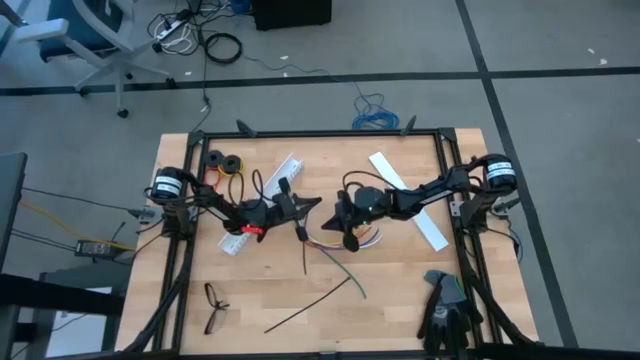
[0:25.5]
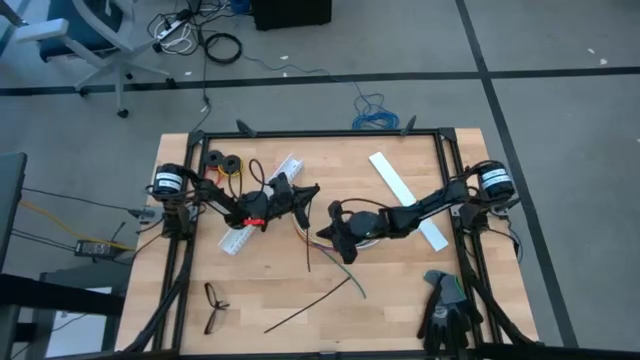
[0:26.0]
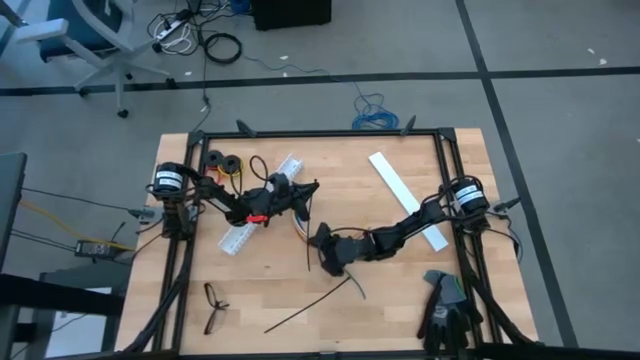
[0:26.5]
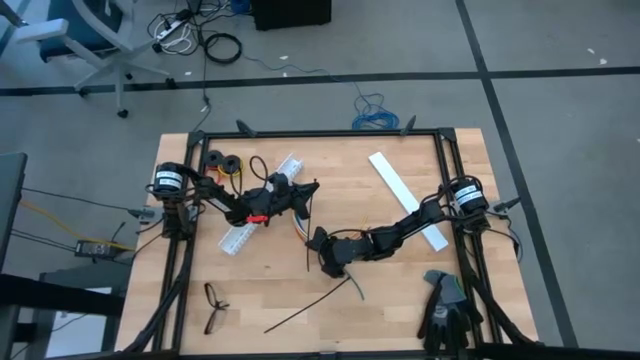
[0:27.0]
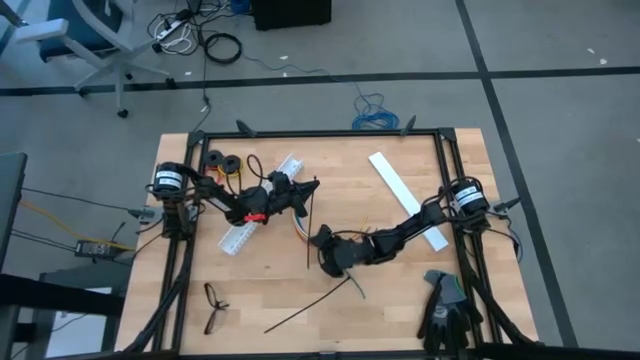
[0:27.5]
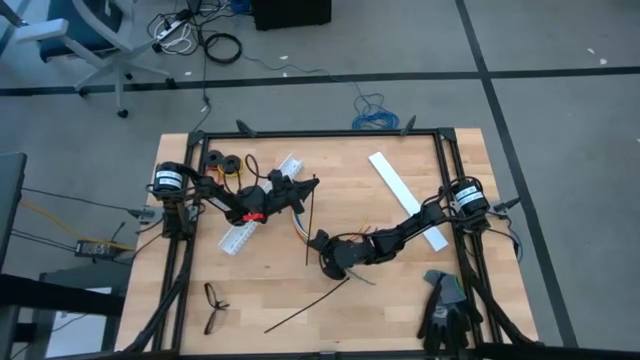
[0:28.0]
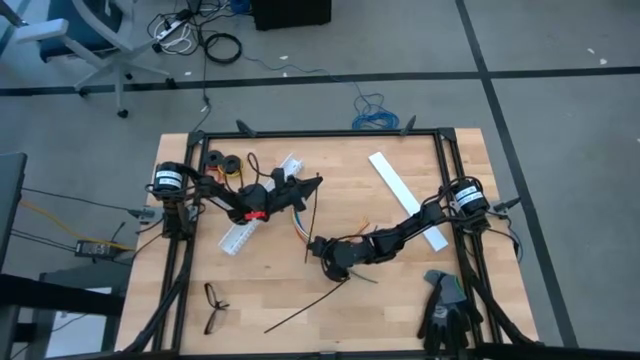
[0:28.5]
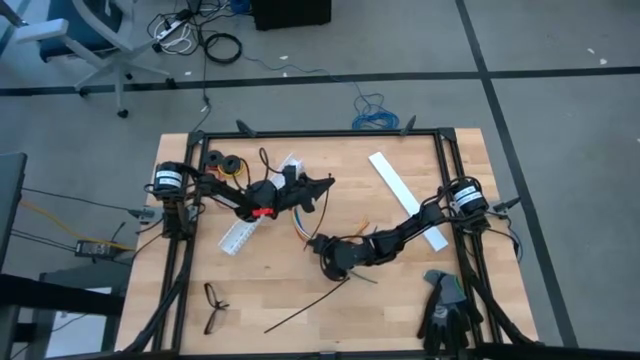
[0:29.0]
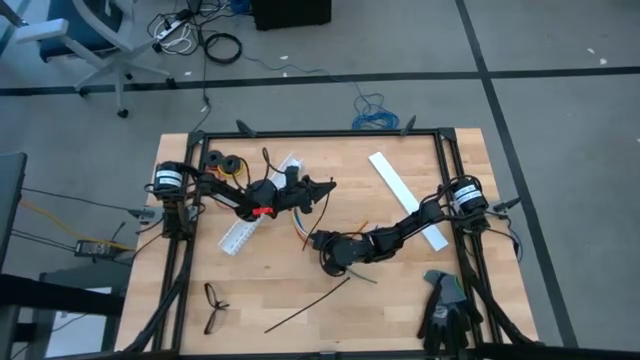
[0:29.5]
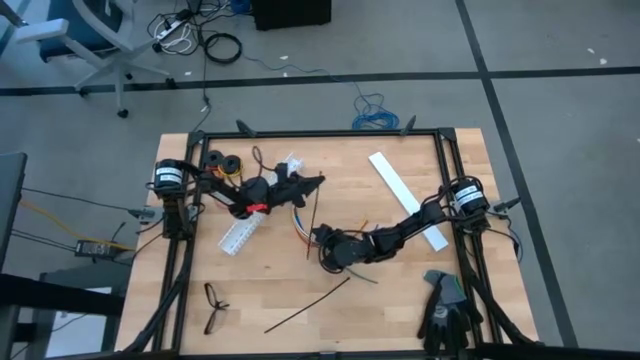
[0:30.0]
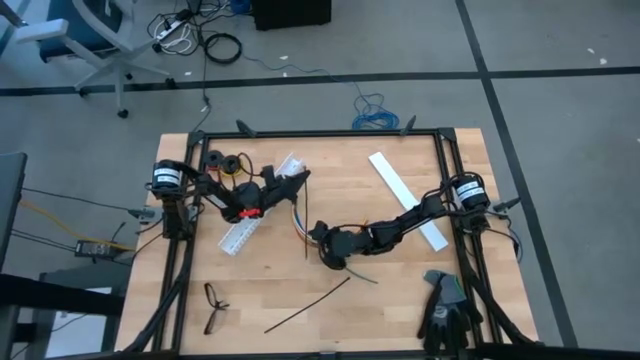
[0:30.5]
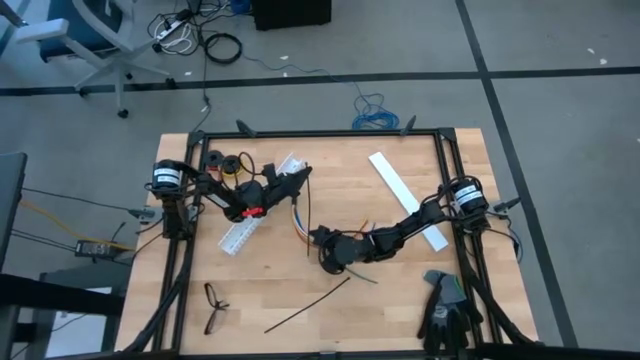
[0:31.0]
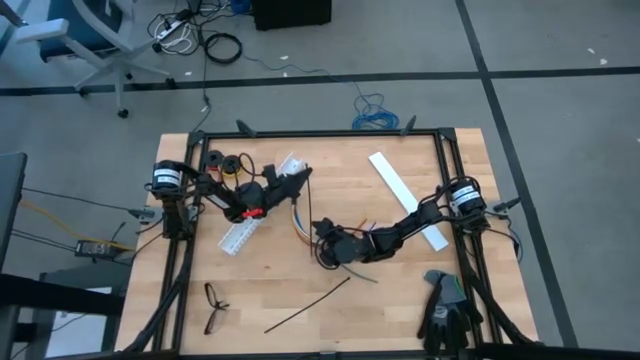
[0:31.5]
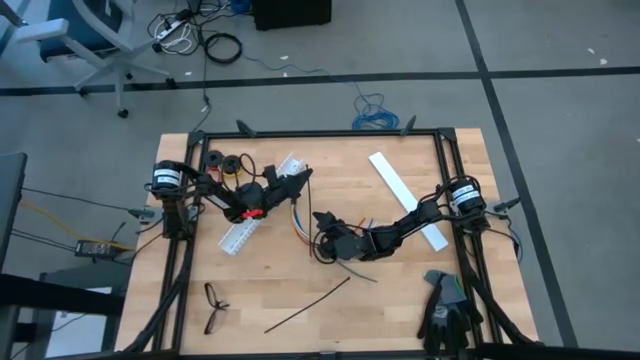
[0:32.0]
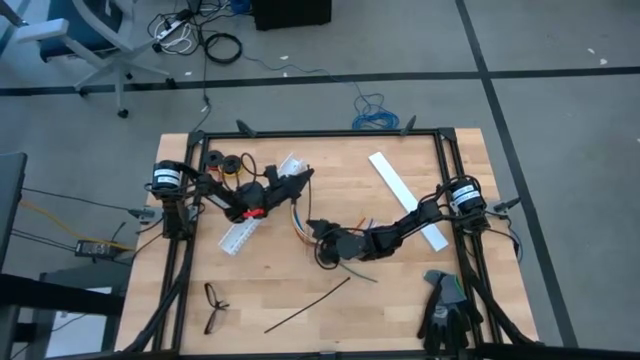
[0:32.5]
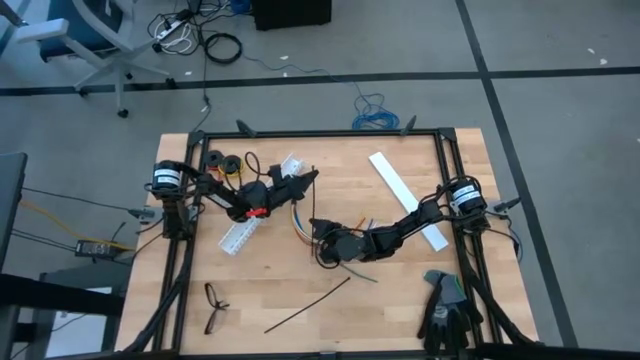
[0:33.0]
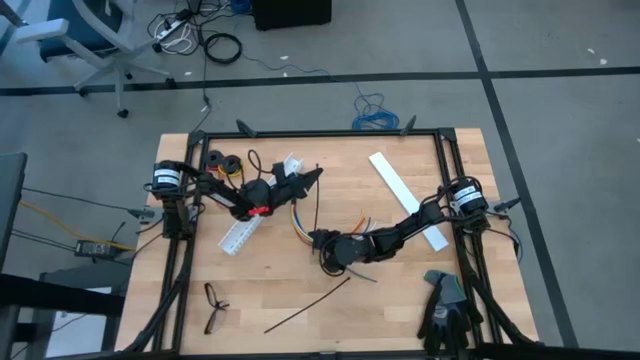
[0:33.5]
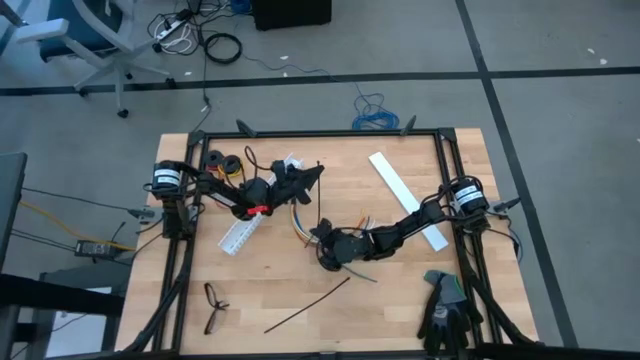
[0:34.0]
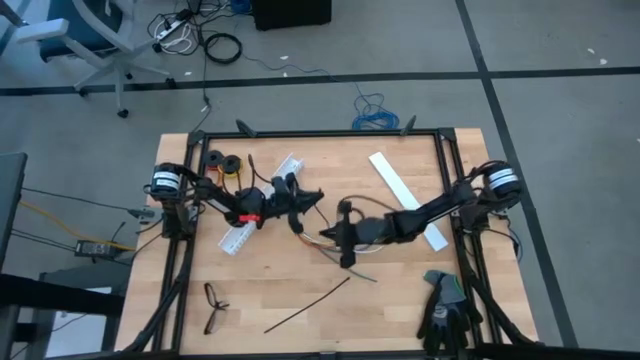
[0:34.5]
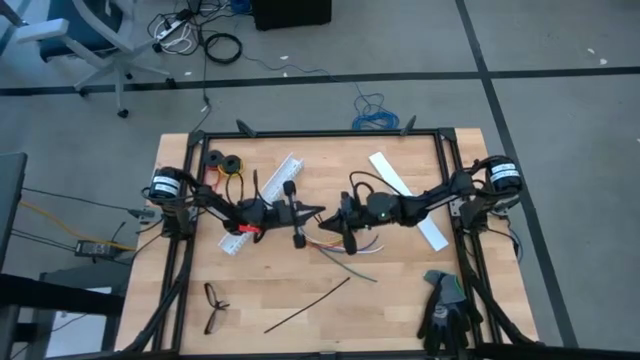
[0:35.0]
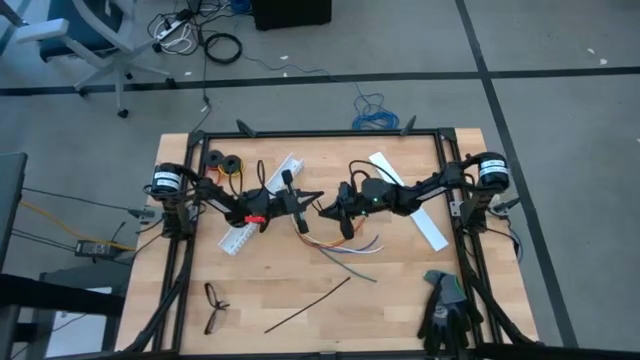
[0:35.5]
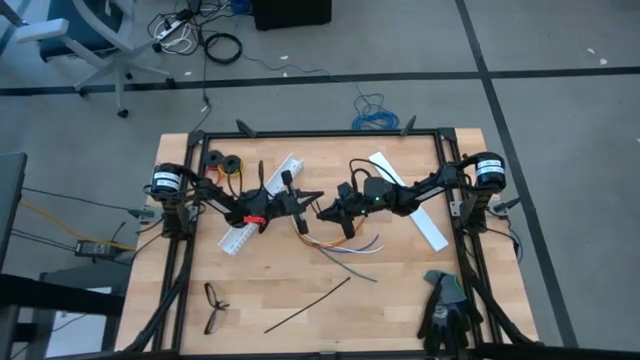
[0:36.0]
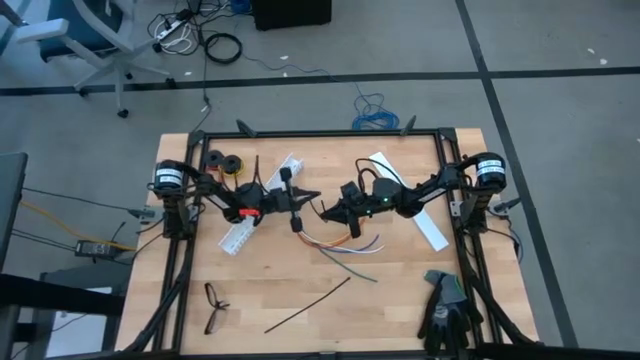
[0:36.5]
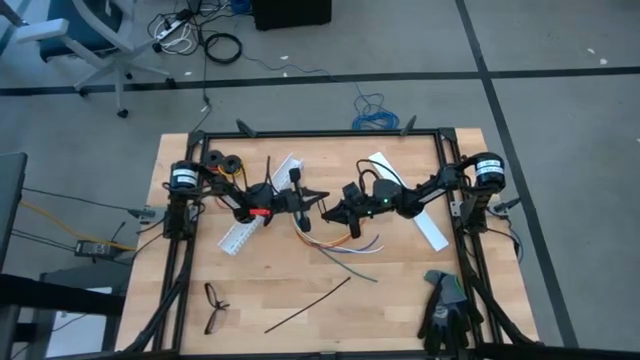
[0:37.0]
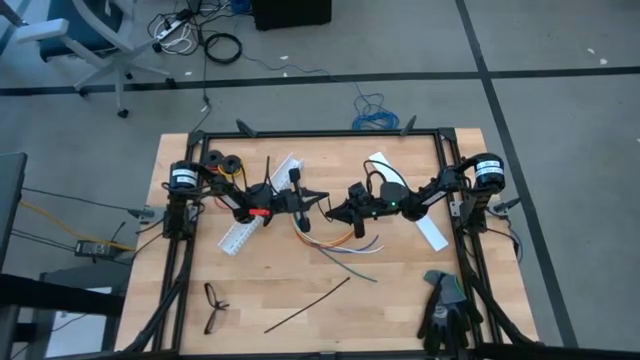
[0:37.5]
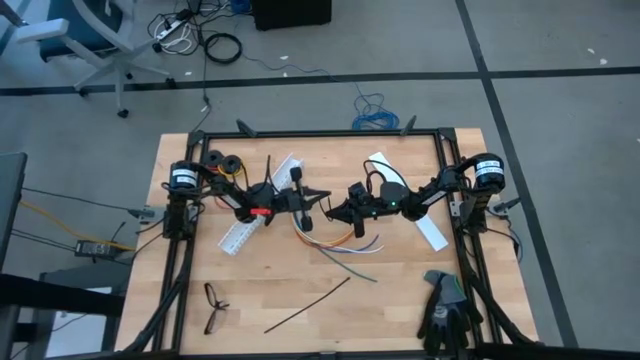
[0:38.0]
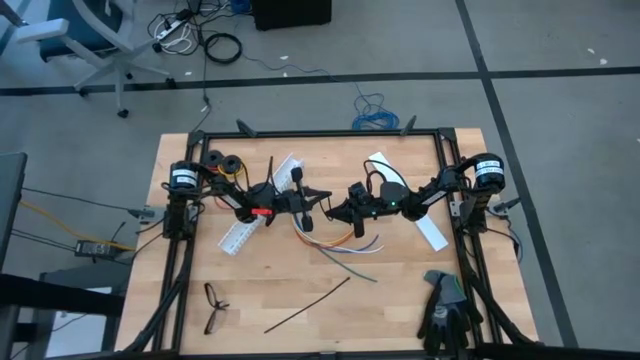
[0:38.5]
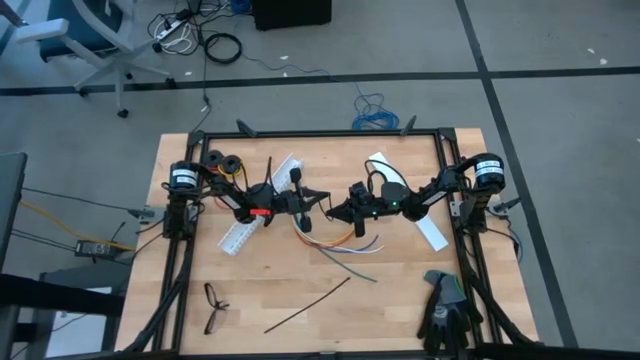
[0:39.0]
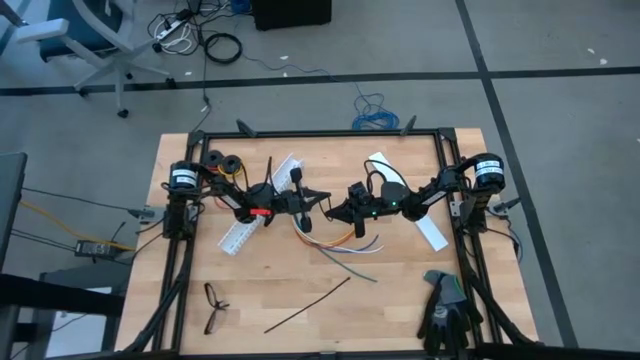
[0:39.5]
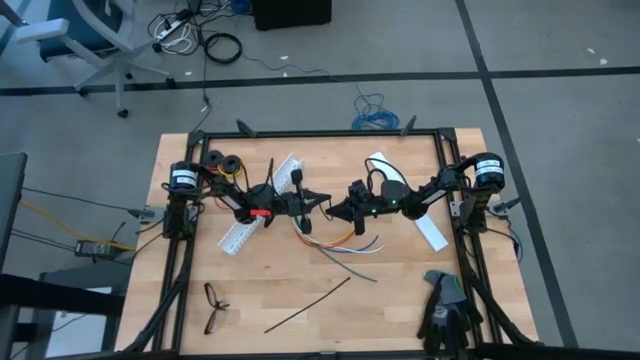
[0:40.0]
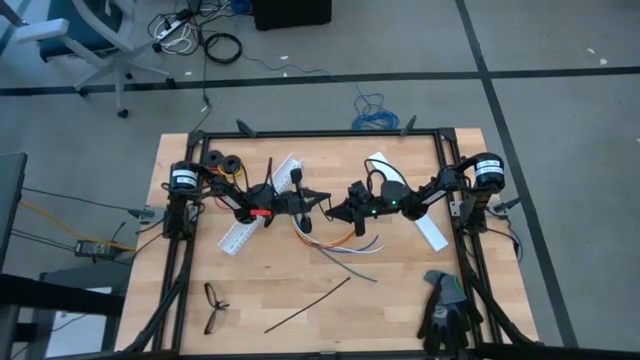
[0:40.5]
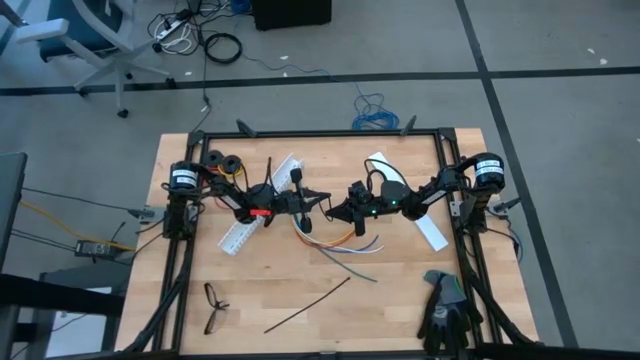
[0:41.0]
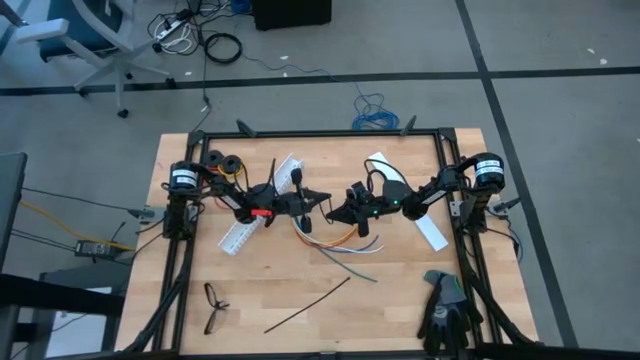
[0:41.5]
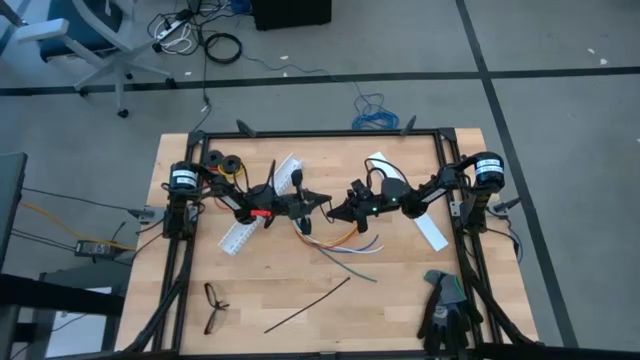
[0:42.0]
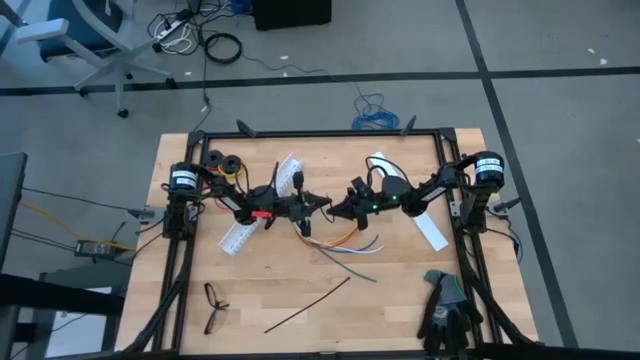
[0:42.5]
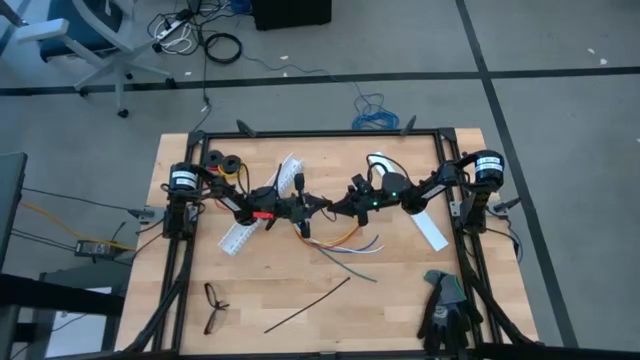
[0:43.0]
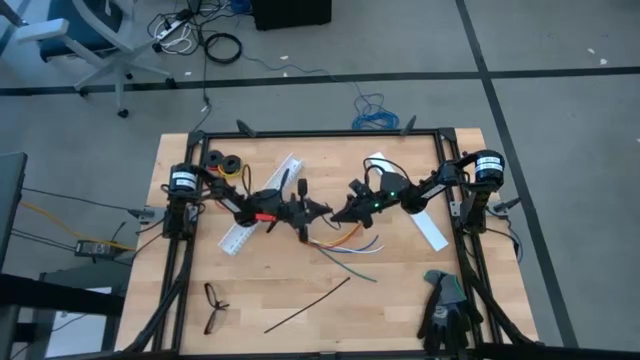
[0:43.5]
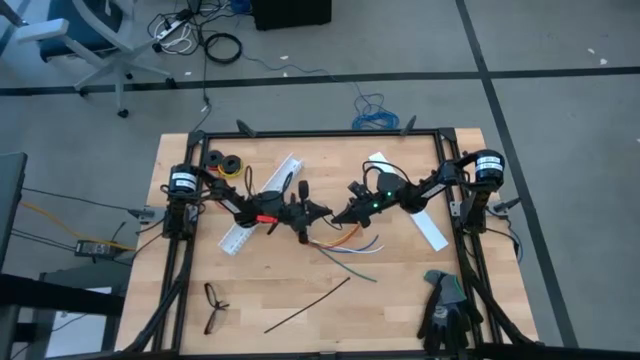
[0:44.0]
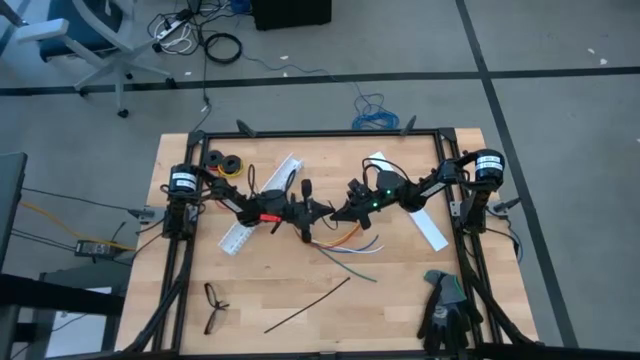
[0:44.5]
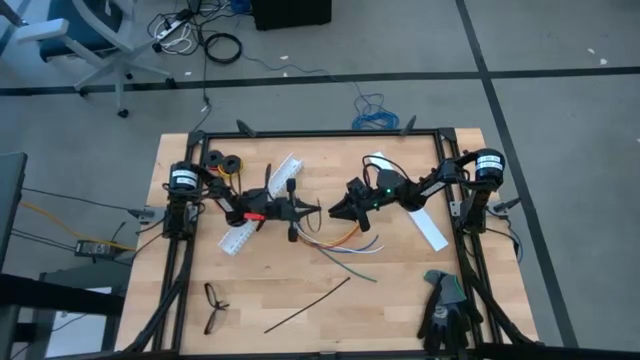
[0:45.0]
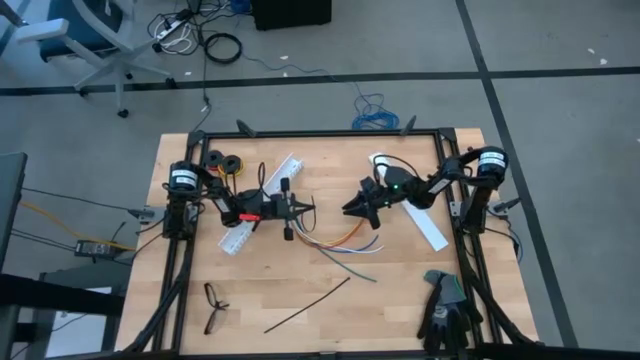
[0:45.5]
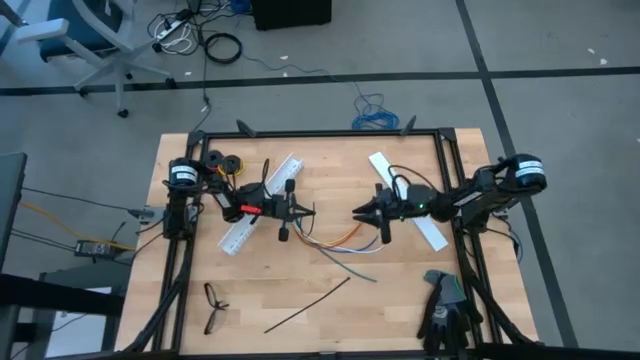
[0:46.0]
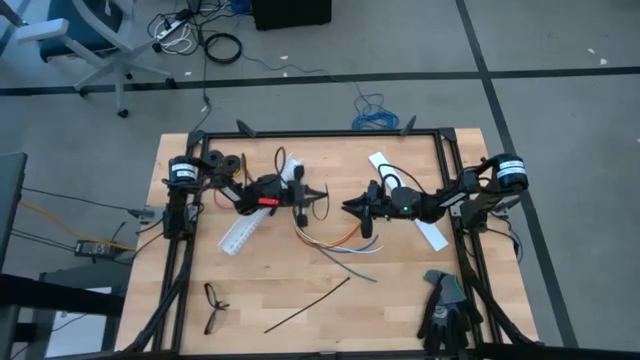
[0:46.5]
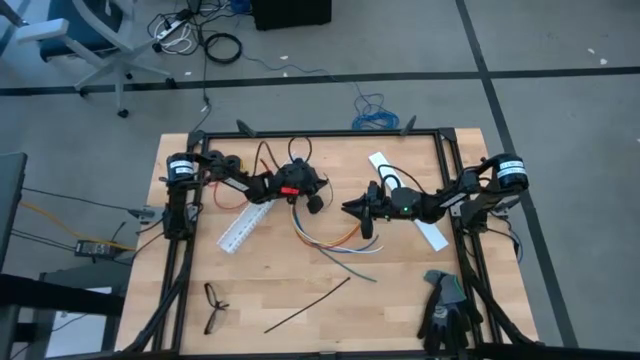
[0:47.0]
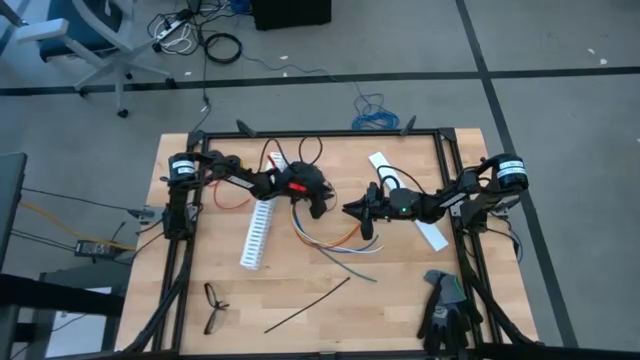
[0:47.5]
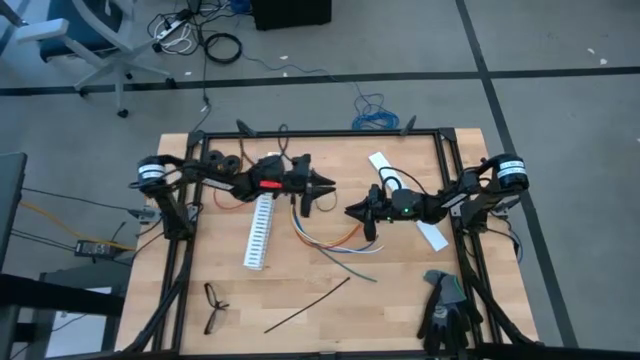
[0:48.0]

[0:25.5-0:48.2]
Task: Ziptie cables
Insert the black zip tie into the lock head
